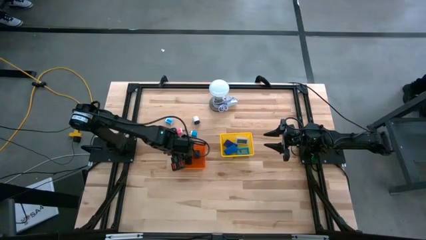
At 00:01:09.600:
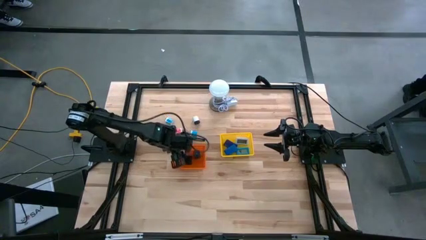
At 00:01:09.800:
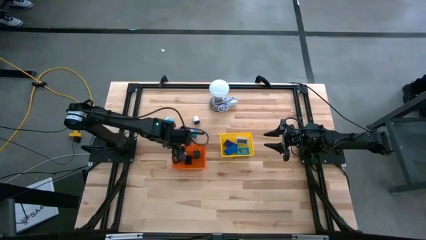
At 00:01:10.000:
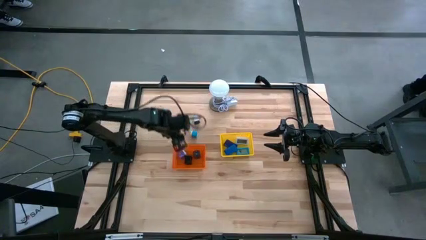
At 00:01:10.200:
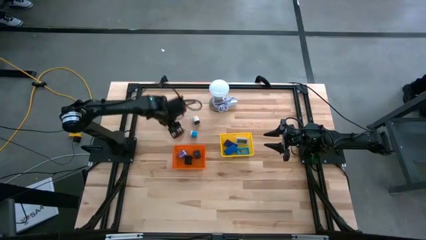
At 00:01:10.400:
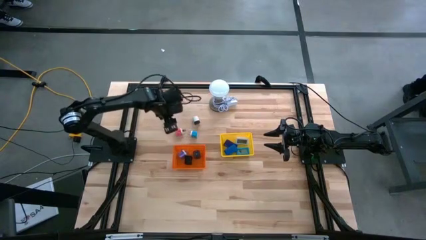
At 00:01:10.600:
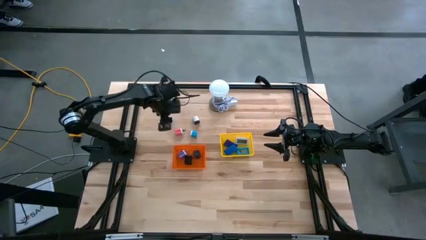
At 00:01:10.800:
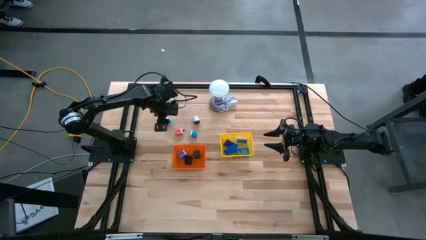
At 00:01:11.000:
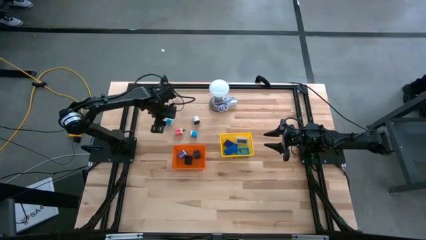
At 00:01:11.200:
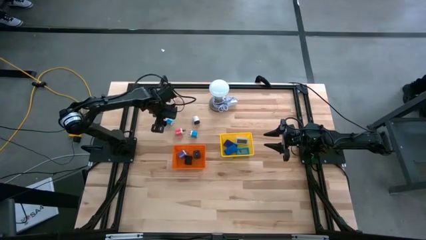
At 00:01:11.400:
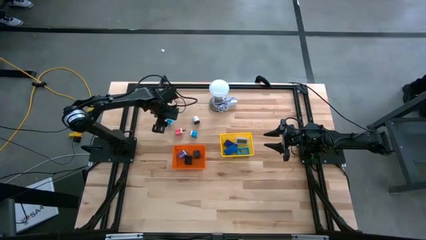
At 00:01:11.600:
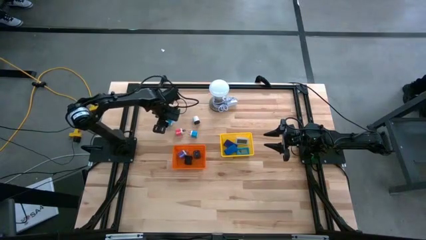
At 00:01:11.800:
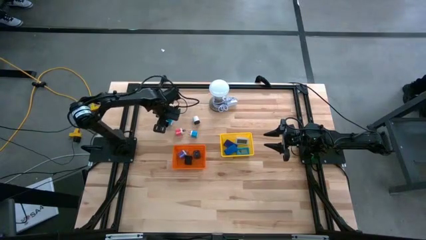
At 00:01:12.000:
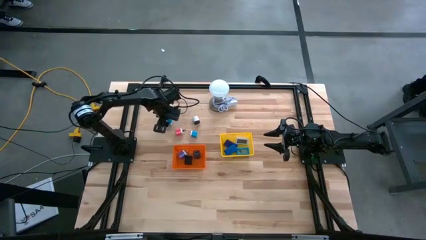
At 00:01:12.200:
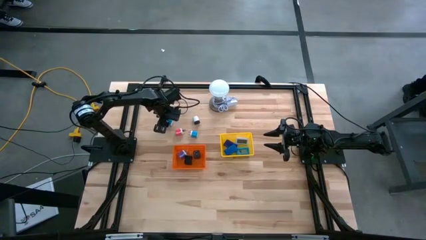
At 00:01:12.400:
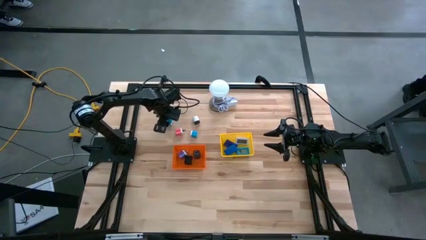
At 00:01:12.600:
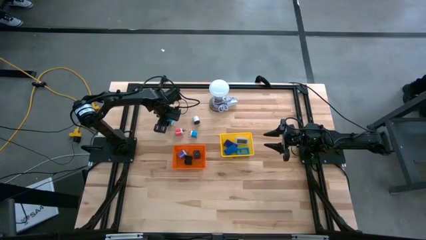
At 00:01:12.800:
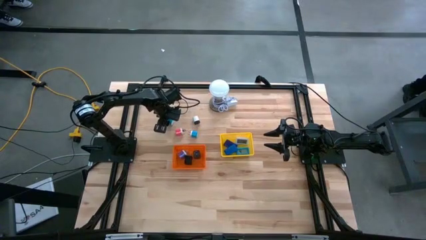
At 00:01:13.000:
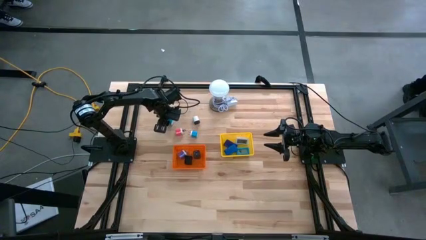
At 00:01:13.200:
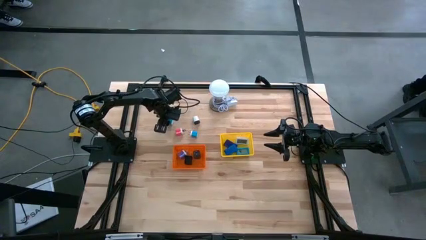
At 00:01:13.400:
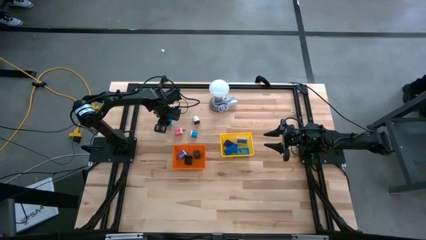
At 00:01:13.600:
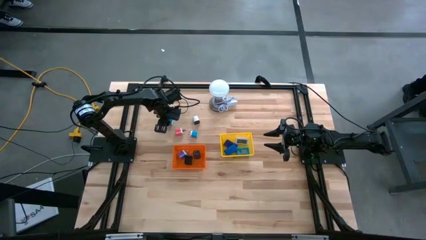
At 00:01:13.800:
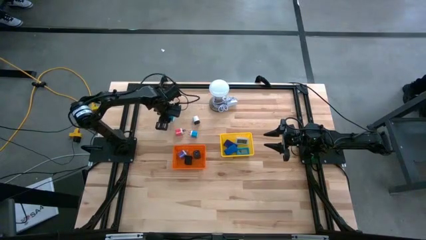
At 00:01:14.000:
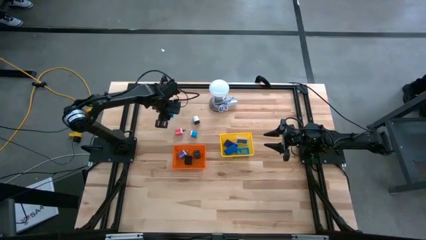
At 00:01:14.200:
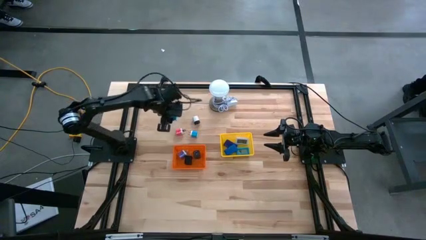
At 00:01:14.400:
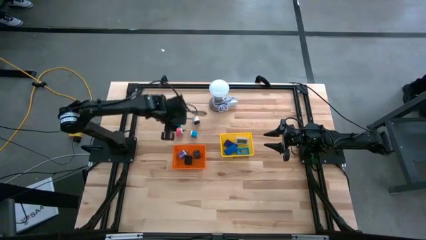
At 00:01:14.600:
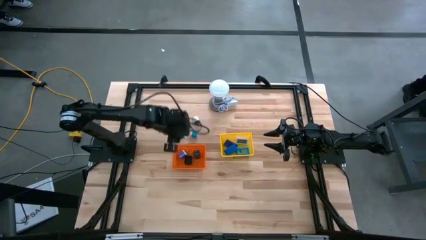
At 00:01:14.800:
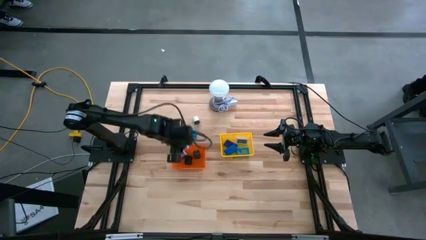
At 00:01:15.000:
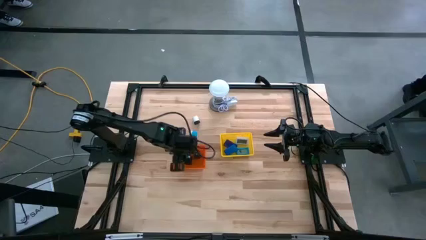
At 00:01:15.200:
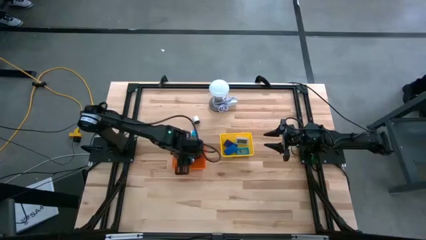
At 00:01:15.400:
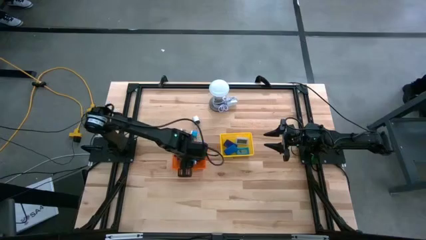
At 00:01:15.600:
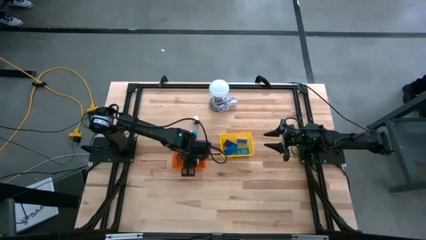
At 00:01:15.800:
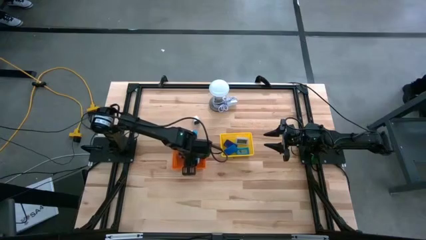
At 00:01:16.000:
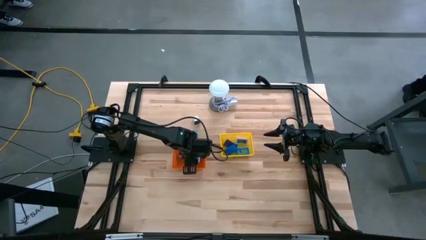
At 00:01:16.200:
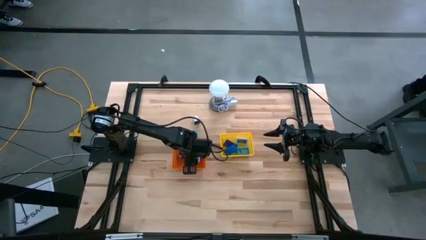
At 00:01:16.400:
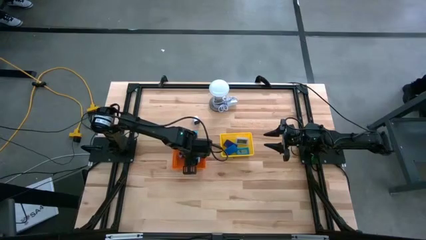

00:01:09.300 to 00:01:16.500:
Task: Pick & Place Office items
Put the left light blue charger adapter into the orange bin

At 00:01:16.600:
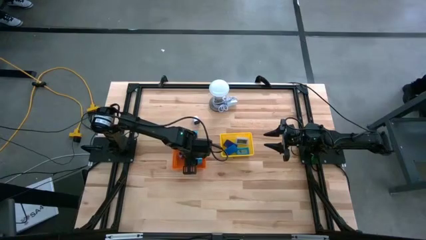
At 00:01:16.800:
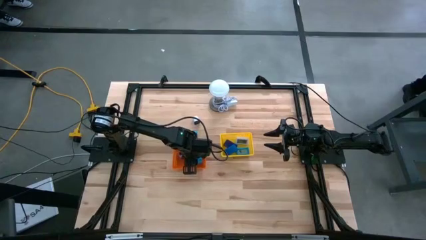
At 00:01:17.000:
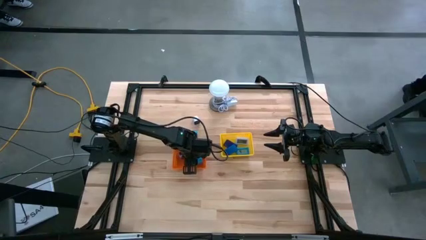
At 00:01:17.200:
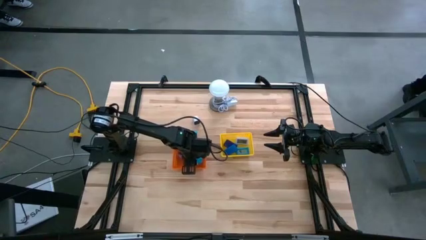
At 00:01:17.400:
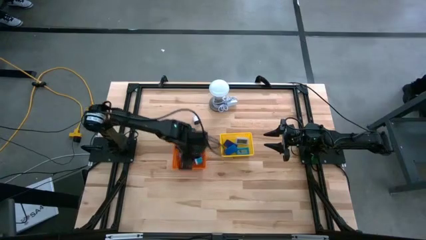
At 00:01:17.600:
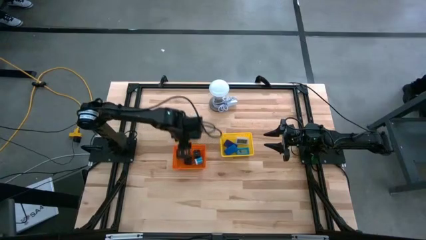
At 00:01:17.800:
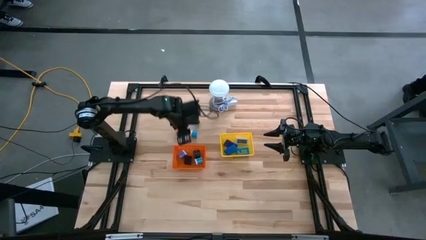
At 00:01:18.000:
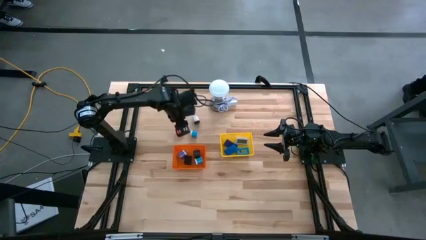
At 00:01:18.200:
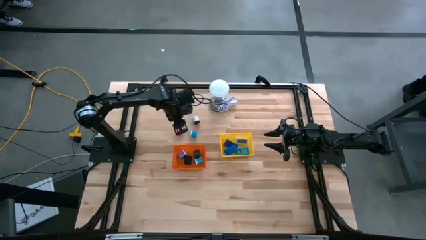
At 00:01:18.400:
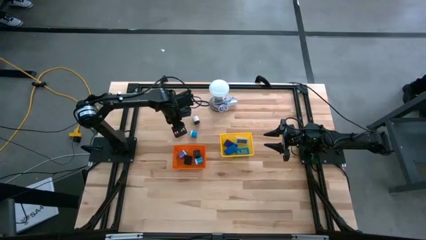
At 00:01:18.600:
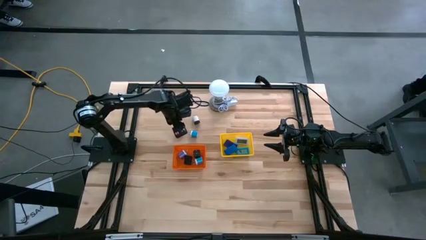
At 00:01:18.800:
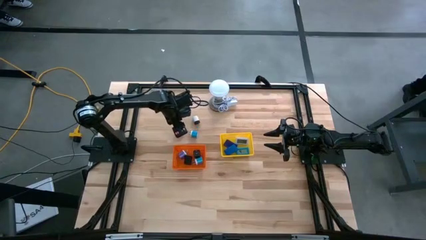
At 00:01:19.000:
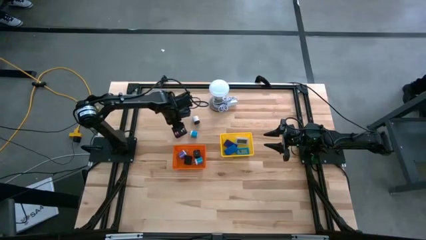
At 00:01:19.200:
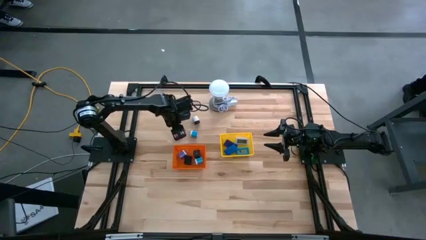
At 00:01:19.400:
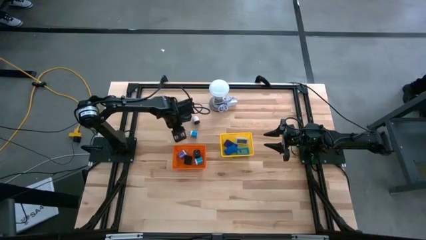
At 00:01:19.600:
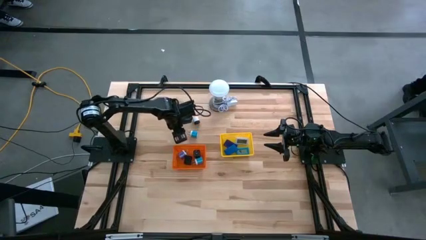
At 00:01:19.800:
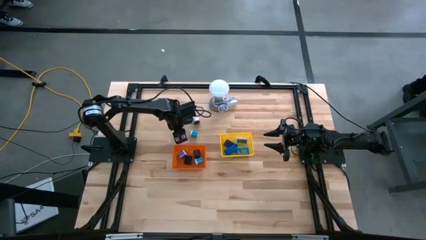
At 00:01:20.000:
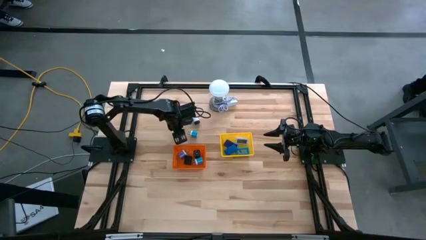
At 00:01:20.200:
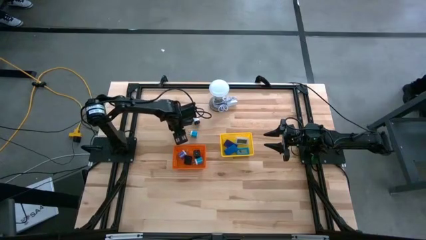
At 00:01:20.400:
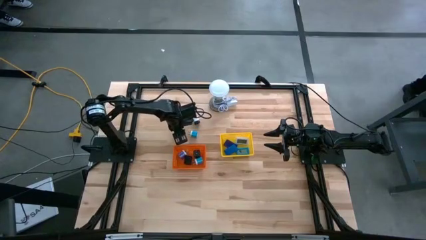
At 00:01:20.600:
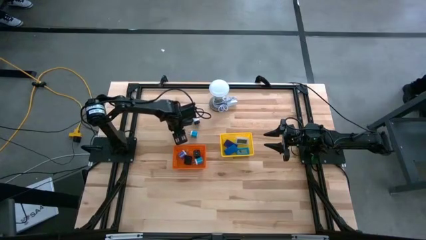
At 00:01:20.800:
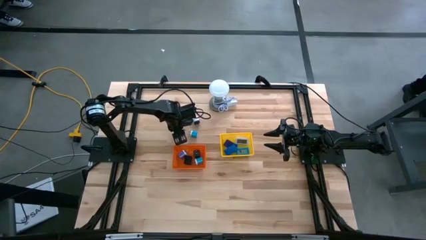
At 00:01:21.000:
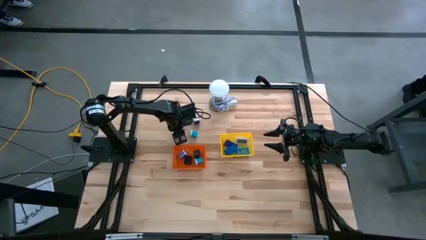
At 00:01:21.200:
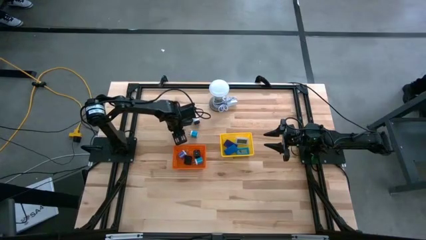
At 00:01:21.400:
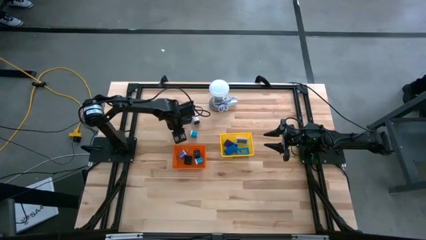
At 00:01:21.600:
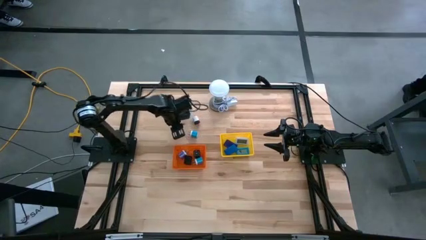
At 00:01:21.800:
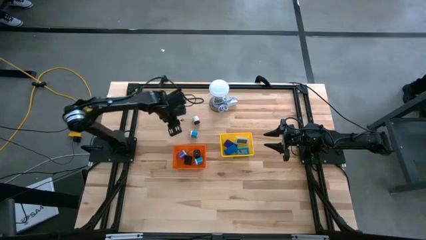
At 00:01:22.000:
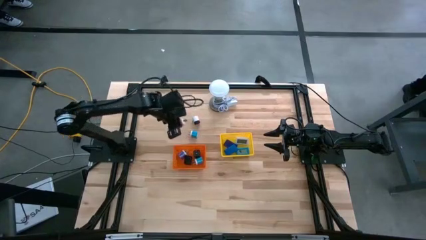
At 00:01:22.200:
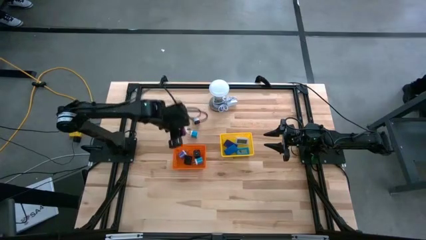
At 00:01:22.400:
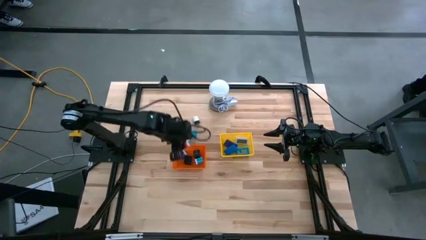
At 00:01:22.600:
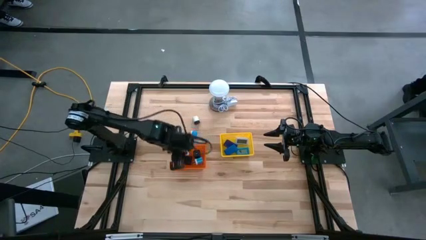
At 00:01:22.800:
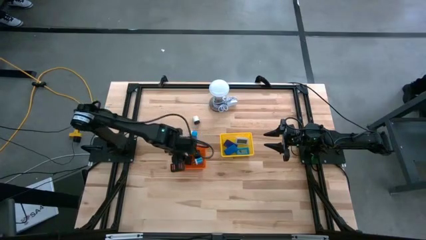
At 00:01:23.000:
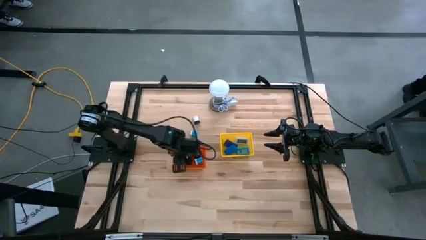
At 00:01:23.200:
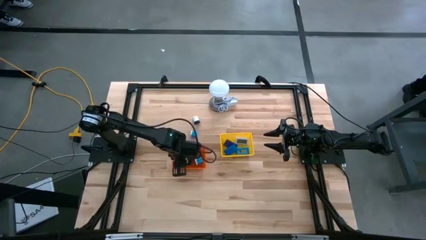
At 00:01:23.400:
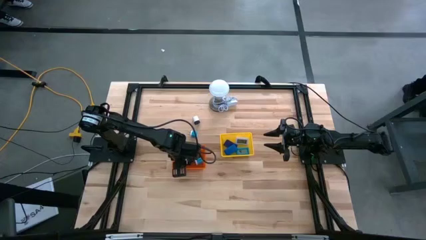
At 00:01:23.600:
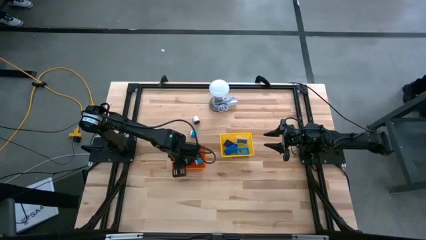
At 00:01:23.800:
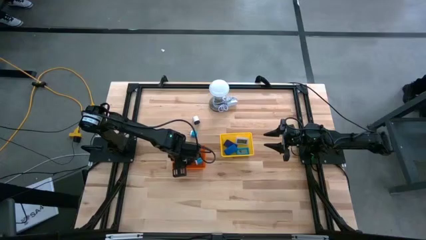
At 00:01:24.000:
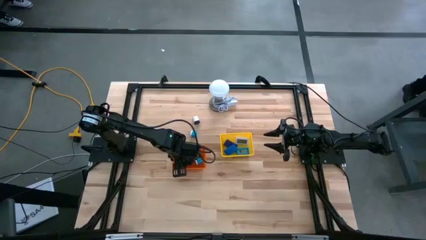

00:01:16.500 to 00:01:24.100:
Put the red charger adapter into the orange bin

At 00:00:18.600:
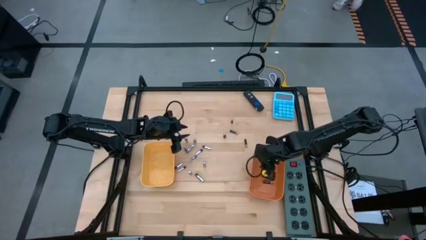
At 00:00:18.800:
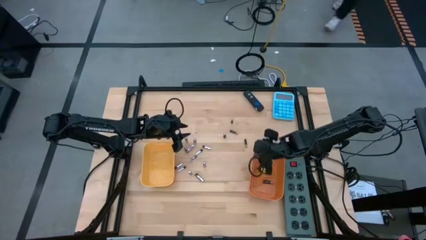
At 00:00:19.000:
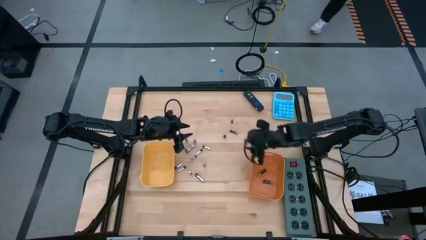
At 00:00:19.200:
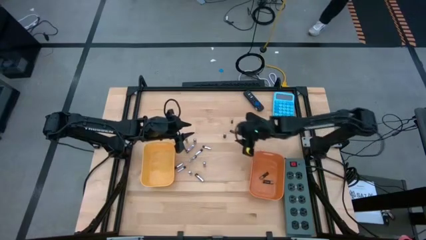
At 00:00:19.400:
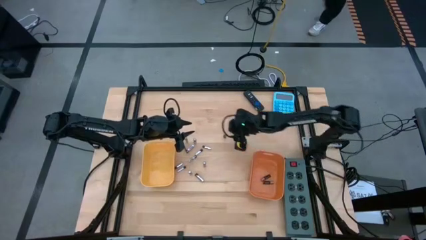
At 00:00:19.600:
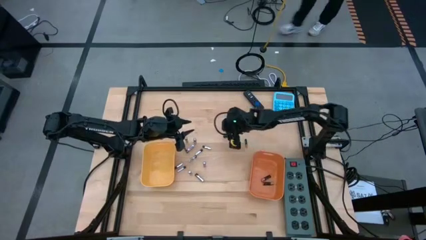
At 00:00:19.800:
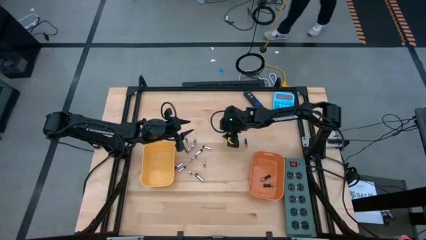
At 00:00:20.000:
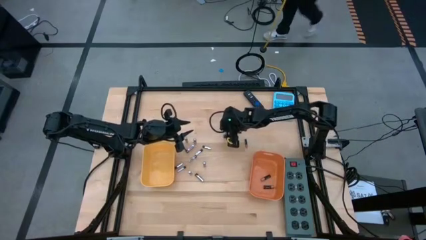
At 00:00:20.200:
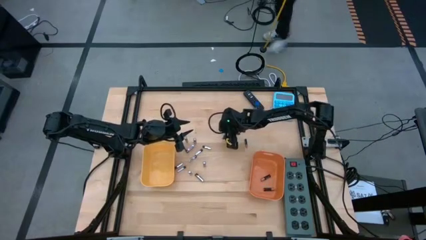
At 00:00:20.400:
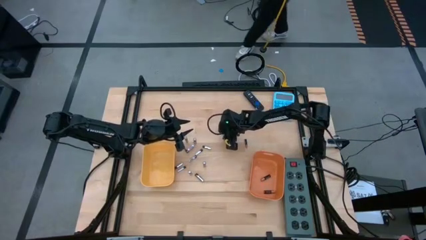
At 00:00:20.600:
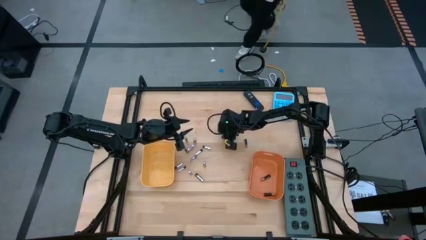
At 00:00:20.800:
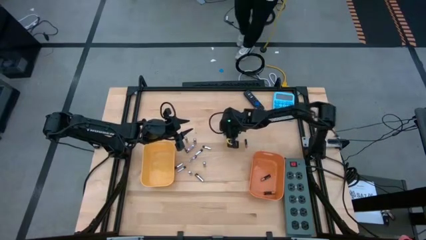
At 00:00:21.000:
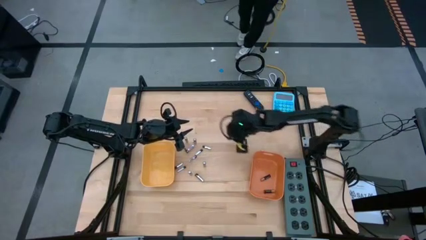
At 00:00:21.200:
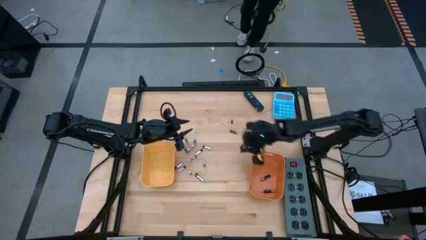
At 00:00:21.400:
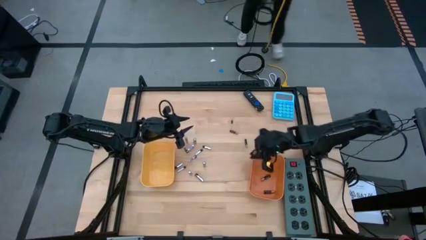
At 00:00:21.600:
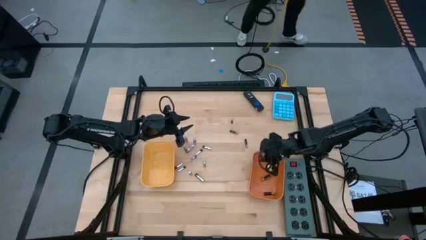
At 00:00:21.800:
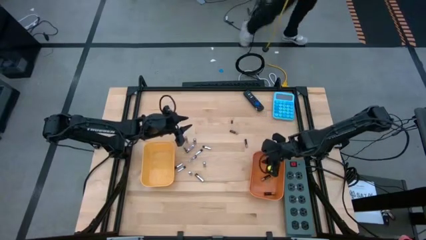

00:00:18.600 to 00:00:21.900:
Task: Sort batteries
Put the black battery into the orange bin
